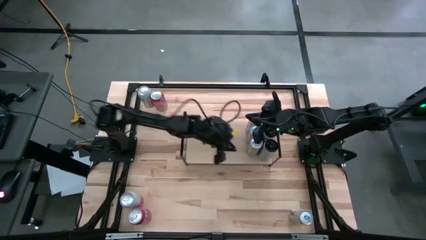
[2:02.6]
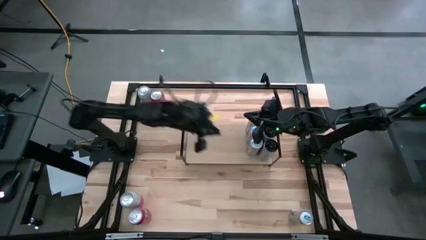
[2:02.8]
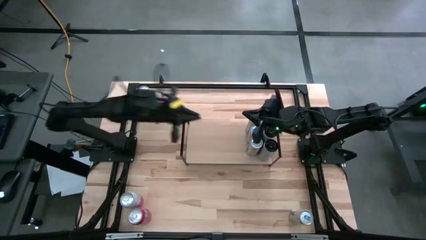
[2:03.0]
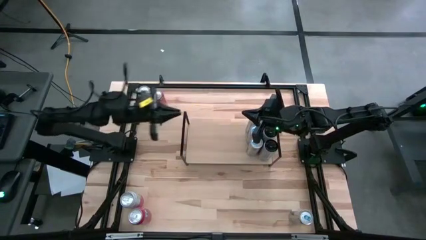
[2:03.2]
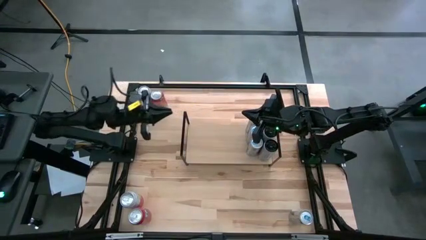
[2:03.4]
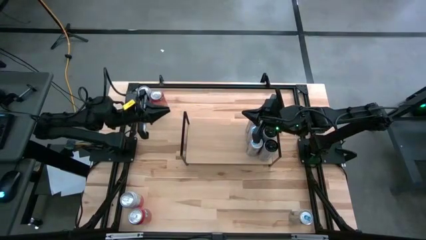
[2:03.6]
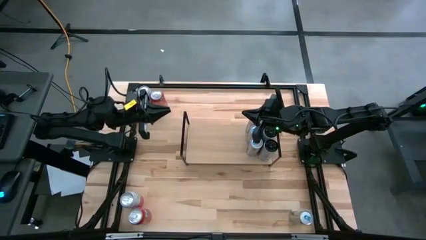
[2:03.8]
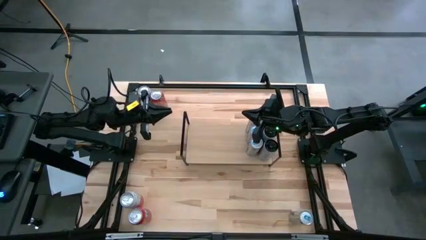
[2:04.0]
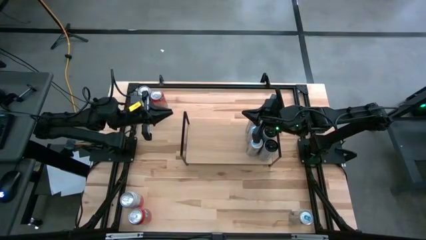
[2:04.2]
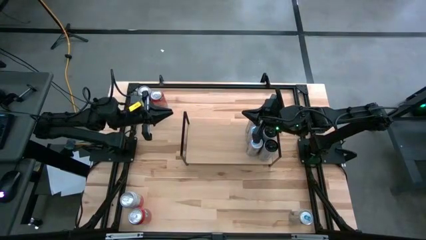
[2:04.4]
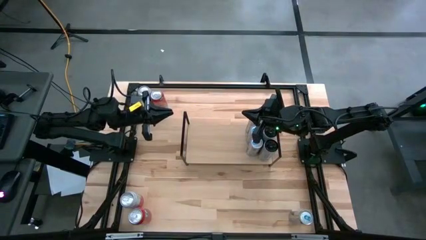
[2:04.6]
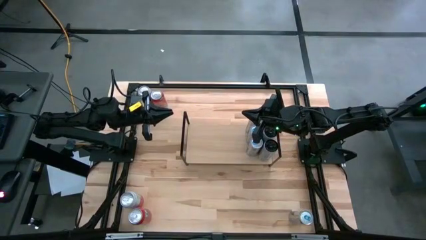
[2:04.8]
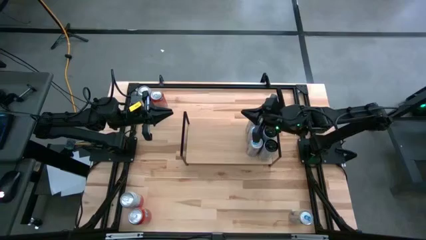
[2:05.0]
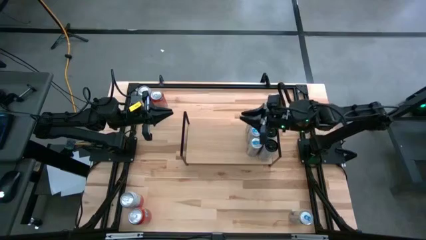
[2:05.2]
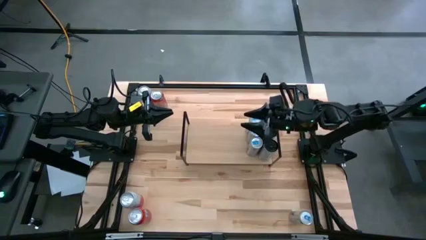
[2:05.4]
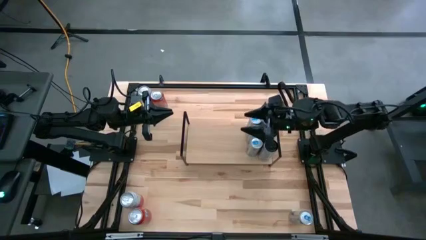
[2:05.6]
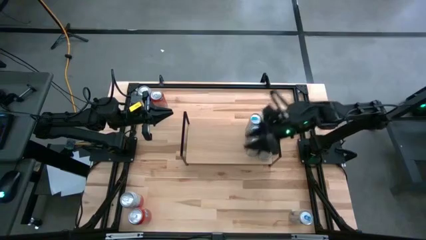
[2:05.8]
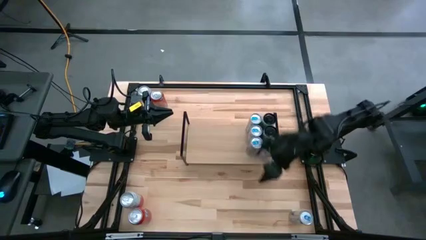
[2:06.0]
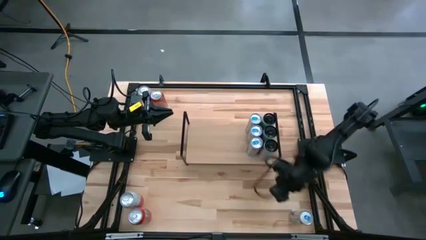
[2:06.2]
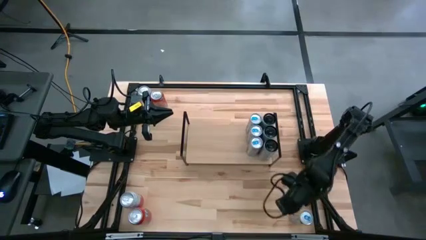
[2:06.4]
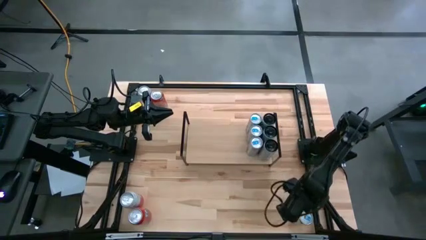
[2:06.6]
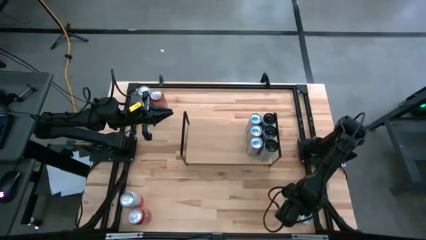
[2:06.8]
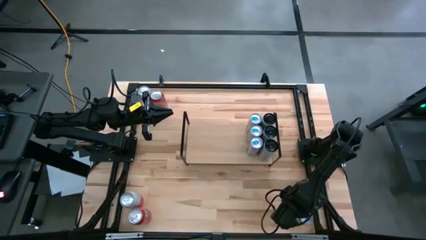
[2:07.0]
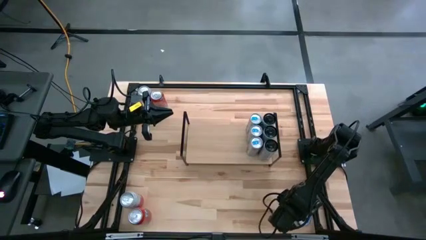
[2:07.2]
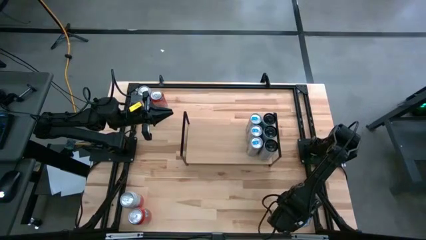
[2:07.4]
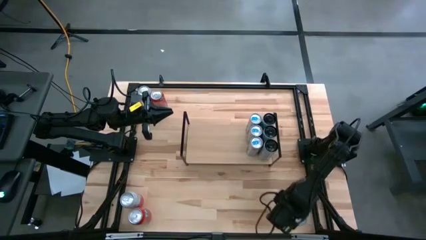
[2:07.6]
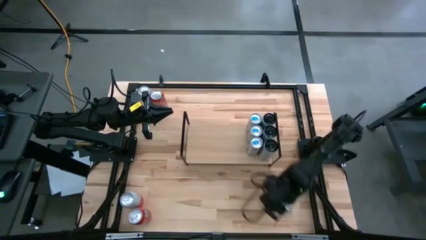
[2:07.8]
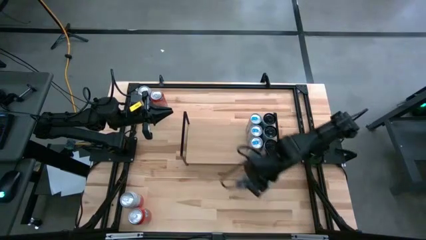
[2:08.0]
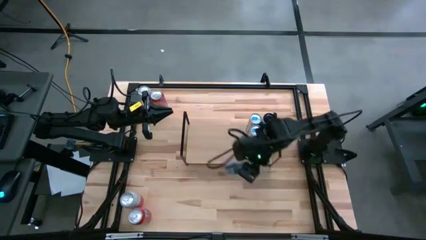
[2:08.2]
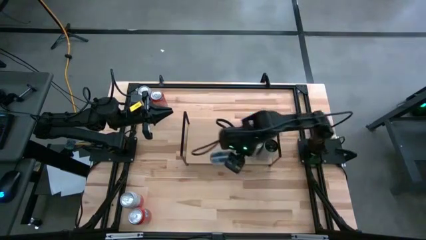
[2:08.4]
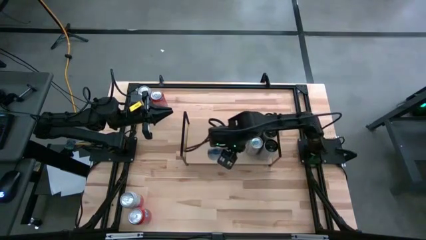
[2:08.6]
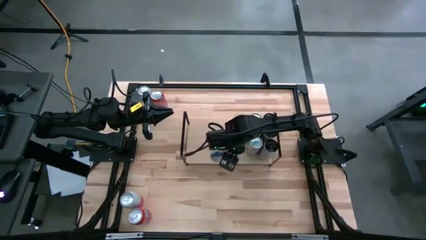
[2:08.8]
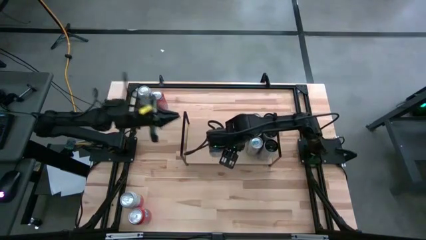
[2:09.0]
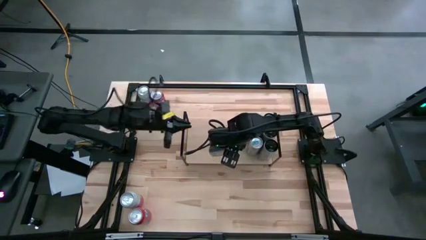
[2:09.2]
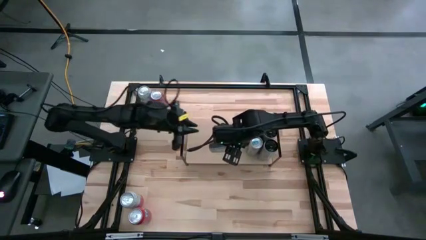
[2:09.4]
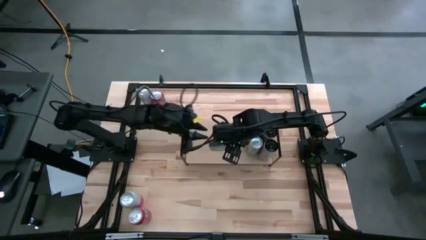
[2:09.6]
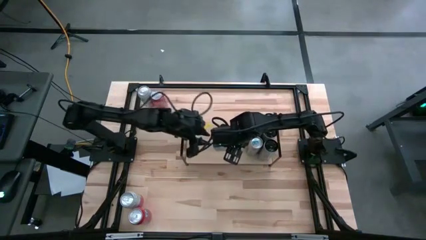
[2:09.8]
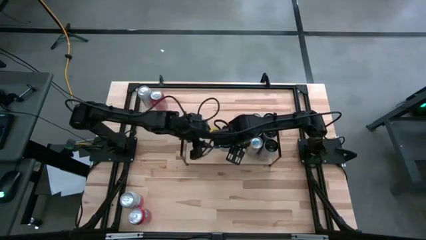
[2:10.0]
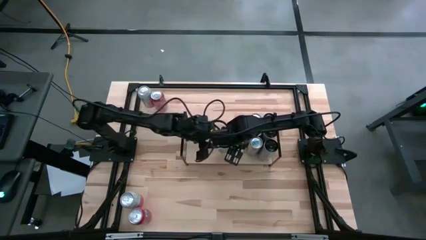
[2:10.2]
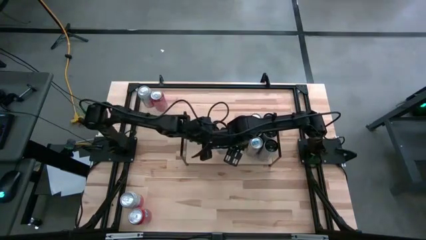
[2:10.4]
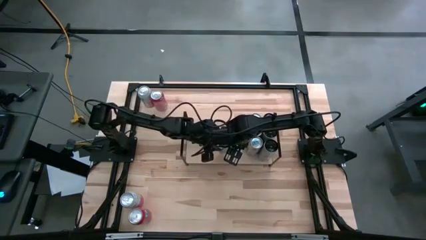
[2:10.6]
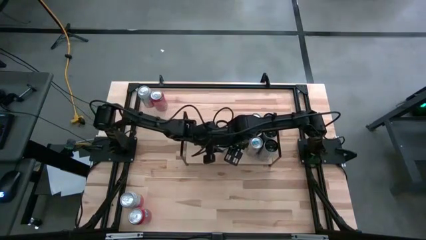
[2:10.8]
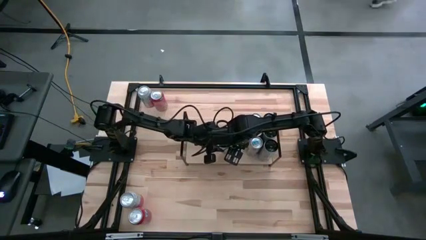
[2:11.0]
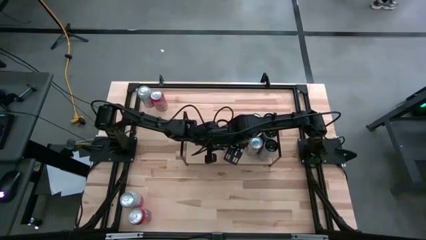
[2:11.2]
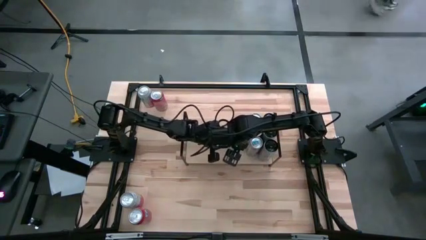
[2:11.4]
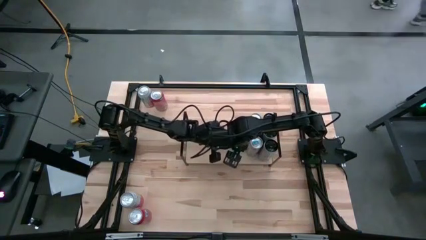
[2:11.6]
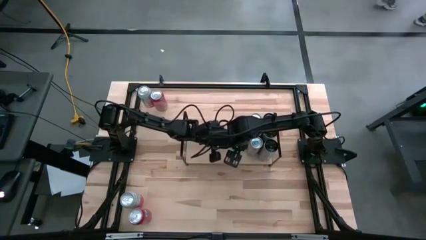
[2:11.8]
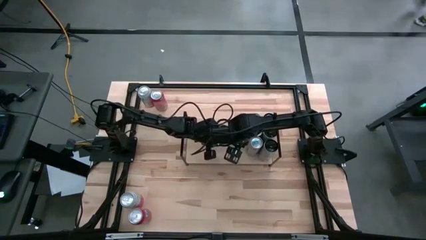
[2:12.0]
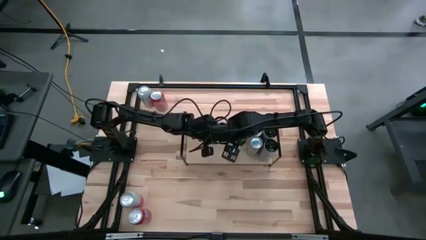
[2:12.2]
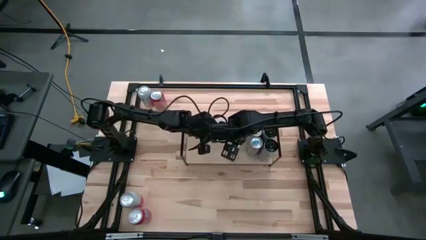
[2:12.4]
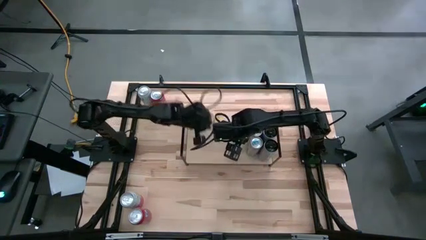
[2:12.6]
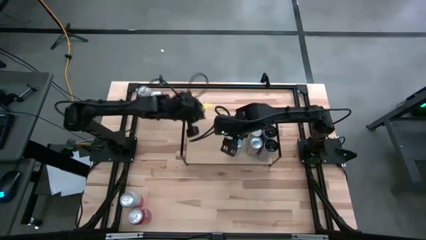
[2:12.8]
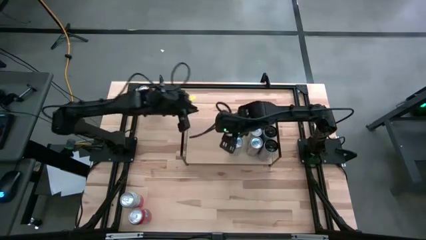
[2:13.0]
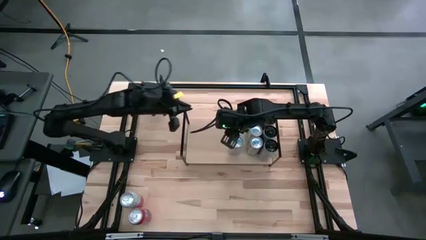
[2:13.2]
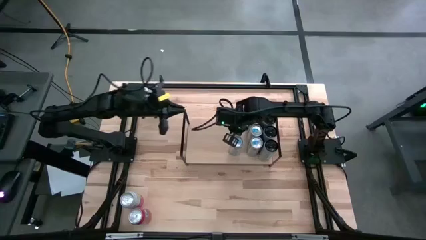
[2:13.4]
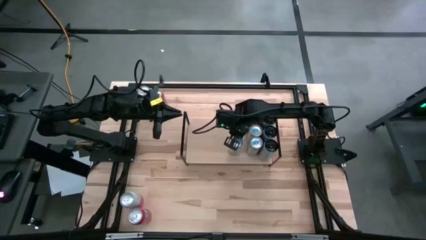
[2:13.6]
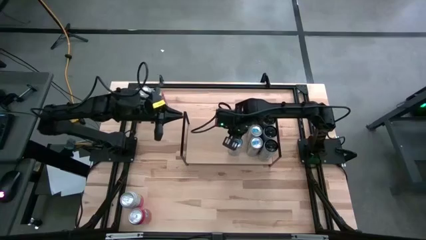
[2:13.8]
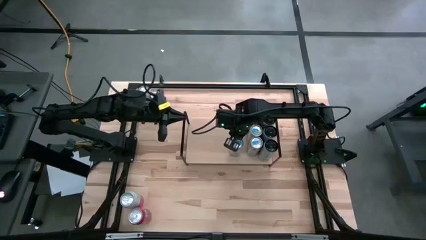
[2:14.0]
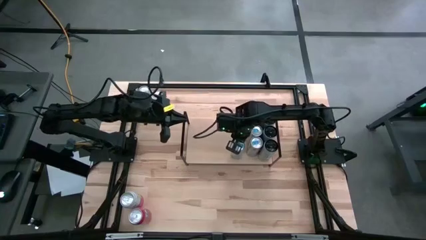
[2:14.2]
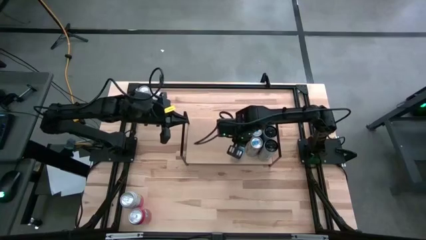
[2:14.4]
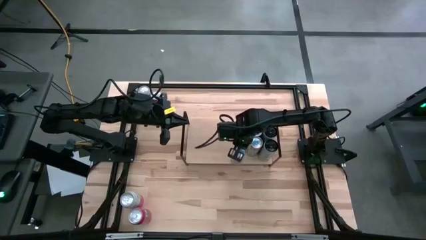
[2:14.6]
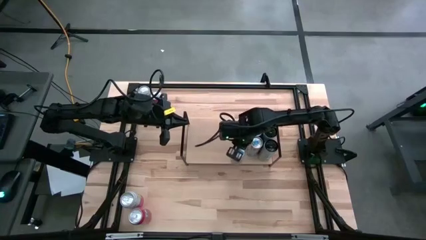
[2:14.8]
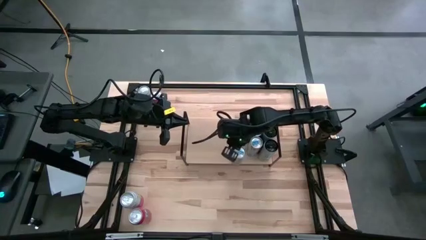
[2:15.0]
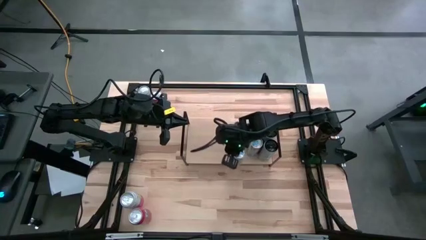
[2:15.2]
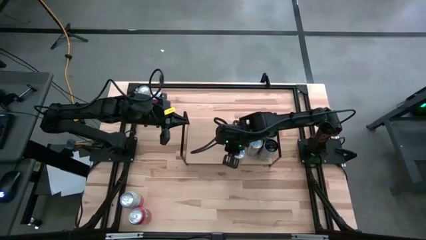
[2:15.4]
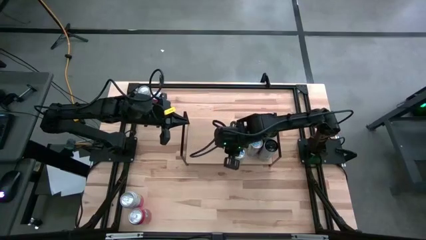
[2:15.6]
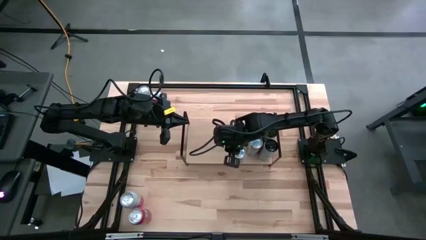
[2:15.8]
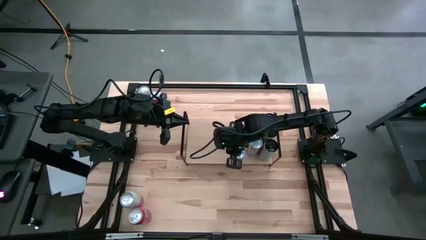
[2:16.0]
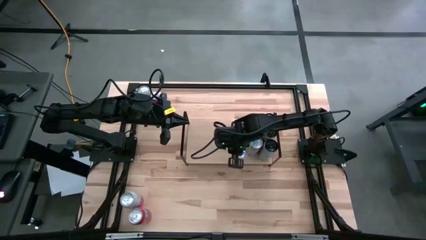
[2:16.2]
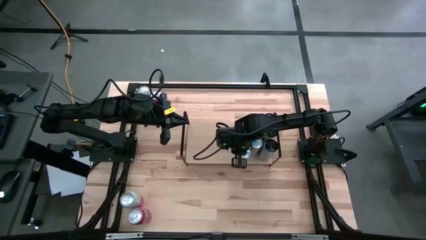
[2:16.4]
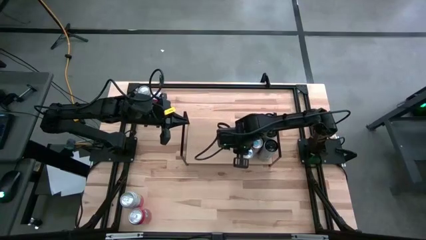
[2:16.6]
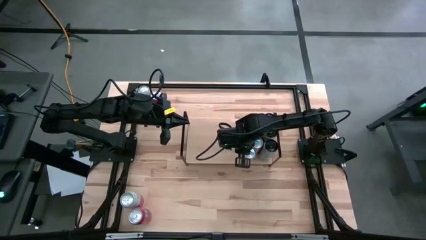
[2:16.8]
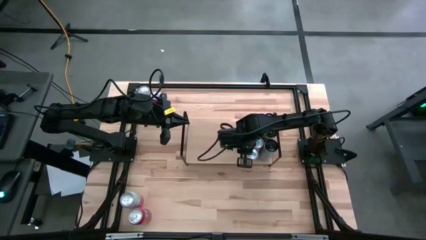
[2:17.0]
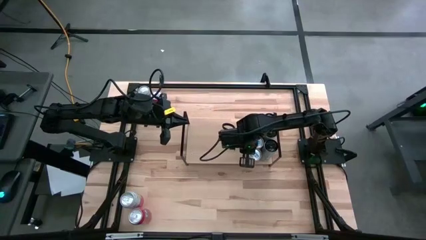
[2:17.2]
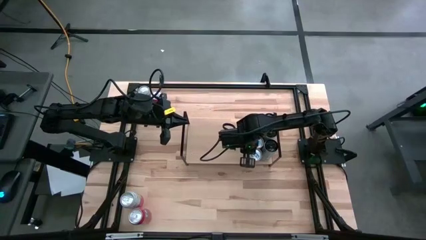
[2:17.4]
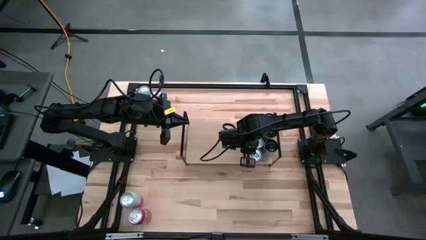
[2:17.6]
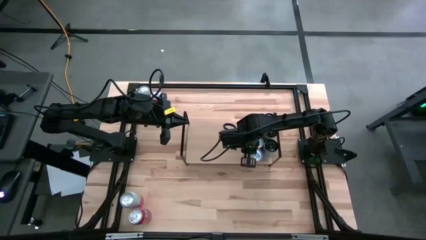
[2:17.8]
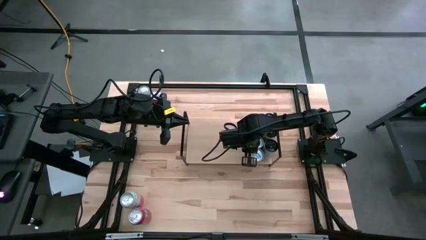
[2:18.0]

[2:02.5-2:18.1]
Task: Place canned beverage on shelf
Put the blue soda can on the shelf aligned with the other blue soda cans

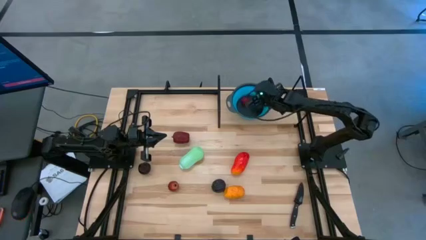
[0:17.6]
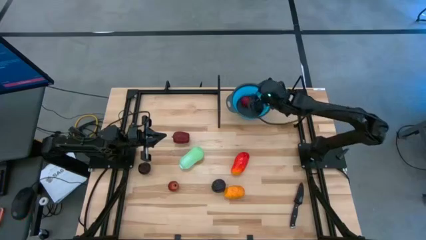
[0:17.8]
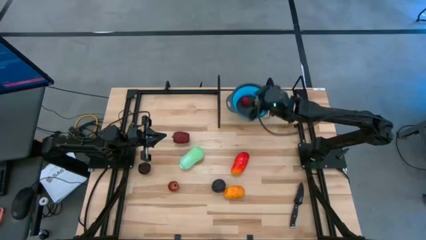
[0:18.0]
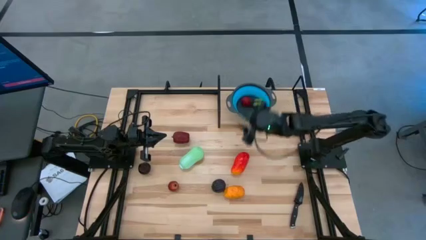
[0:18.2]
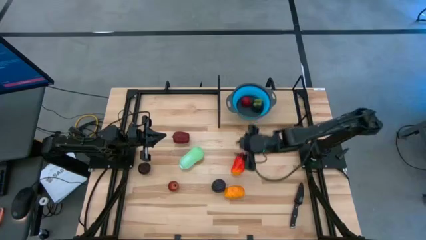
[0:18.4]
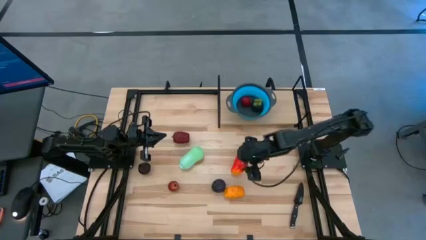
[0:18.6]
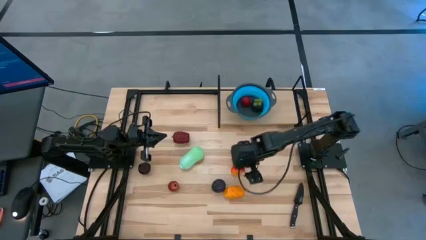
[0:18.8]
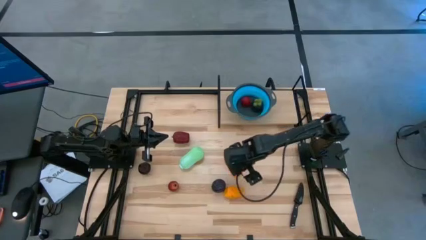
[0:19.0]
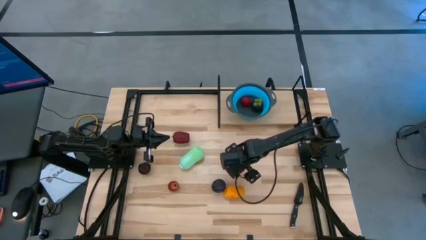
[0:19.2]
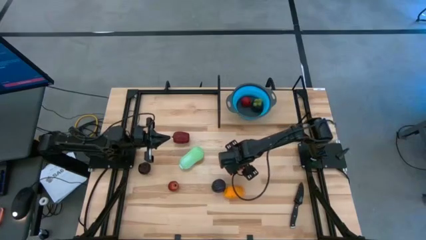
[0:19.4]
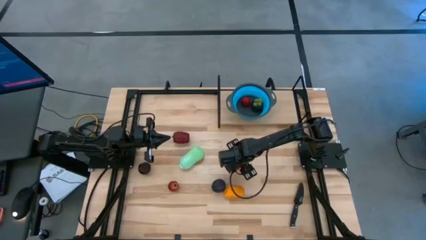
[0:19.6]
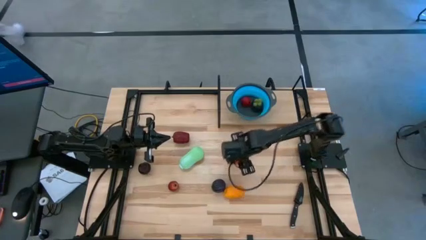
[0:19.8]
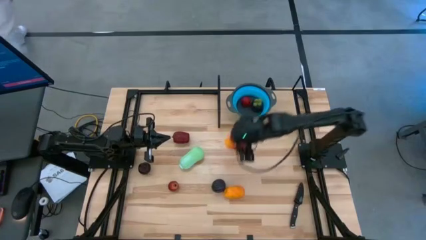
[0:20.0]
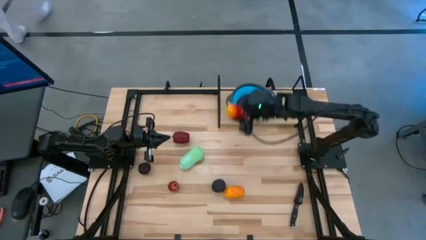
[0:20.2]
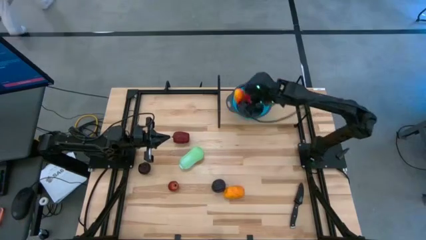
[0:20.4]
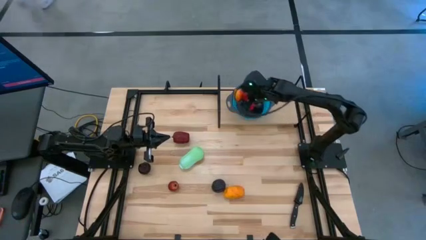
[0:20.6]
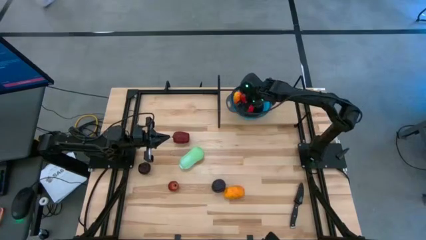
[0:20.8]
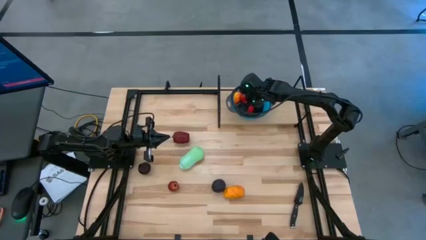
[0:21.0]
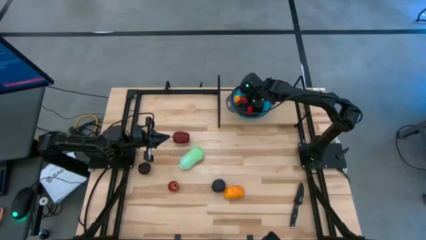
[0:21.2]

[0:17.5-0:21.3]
Task: Pick & Place Fruit
Put the red mango into the blue strainer bowl on the shelf
